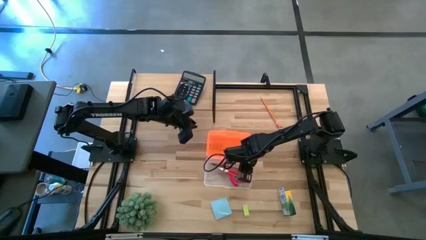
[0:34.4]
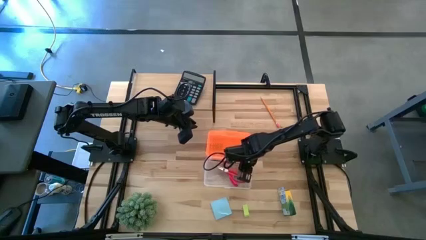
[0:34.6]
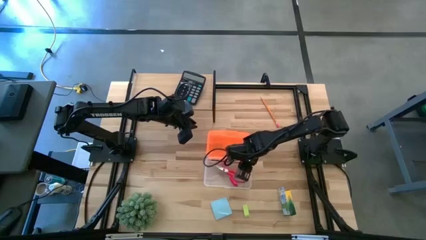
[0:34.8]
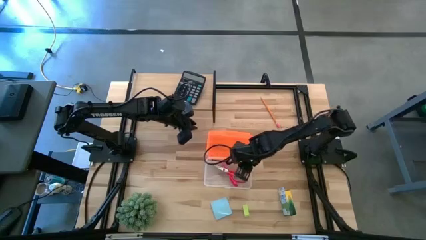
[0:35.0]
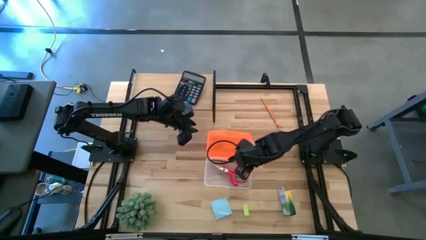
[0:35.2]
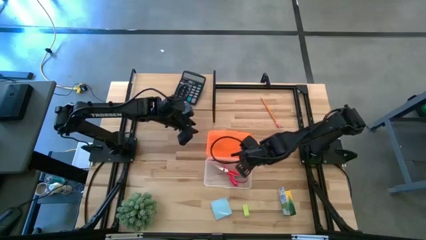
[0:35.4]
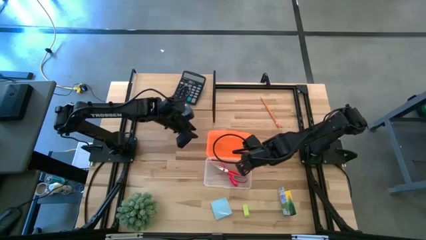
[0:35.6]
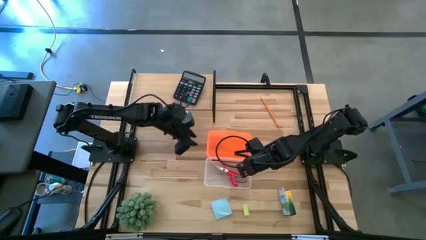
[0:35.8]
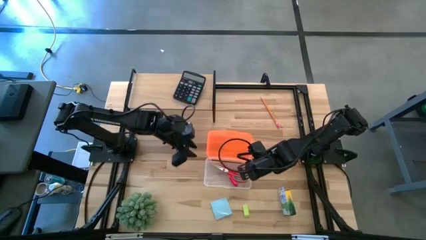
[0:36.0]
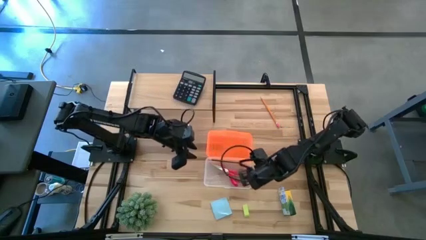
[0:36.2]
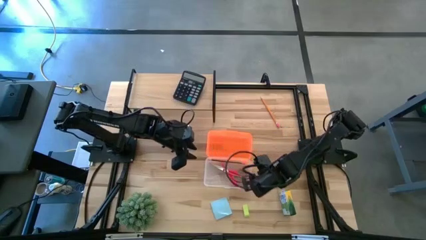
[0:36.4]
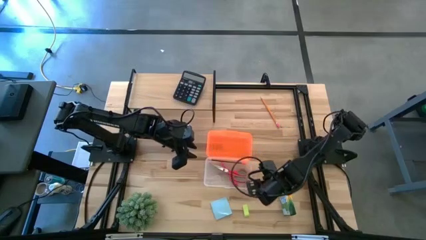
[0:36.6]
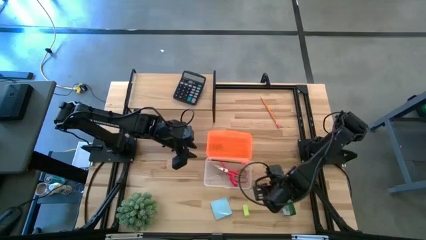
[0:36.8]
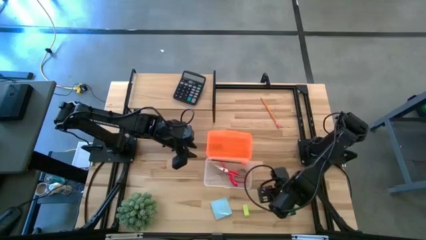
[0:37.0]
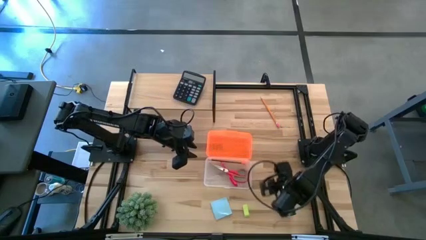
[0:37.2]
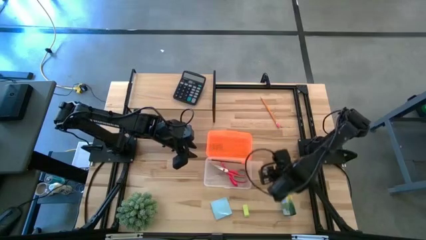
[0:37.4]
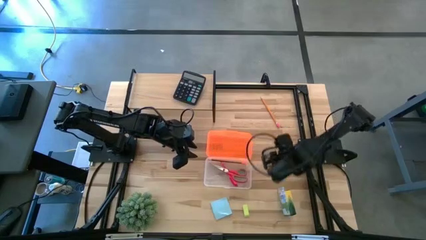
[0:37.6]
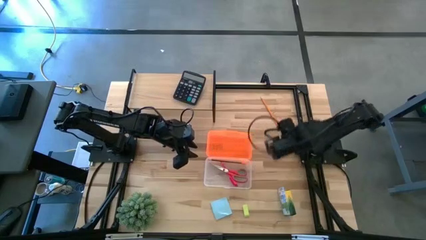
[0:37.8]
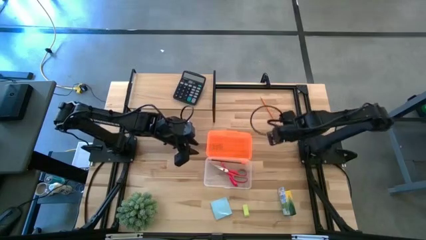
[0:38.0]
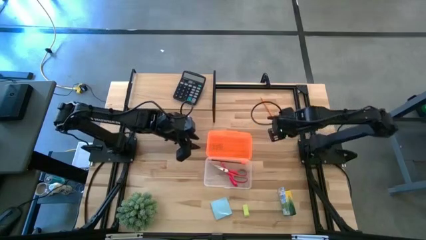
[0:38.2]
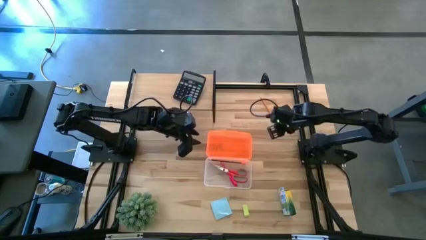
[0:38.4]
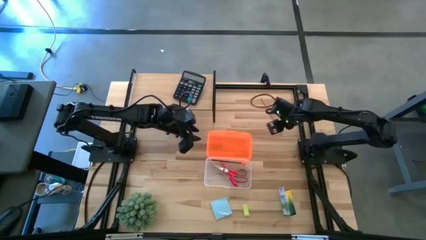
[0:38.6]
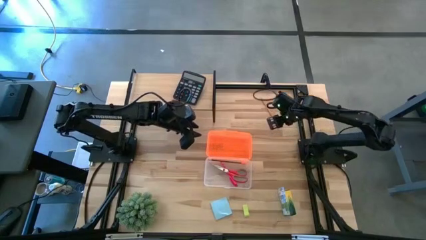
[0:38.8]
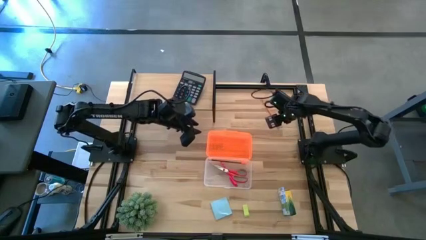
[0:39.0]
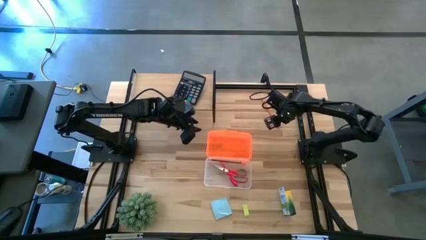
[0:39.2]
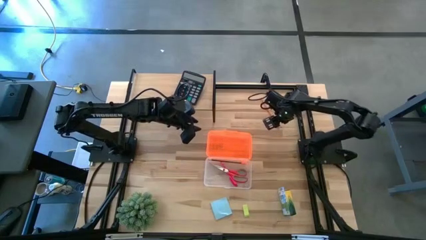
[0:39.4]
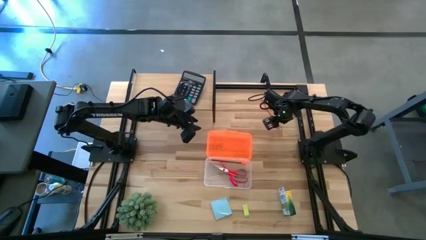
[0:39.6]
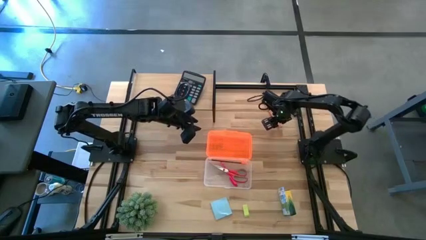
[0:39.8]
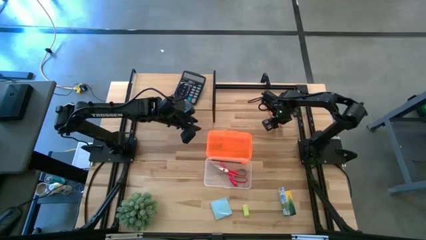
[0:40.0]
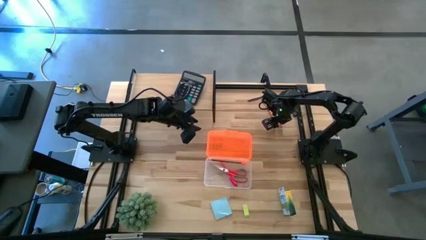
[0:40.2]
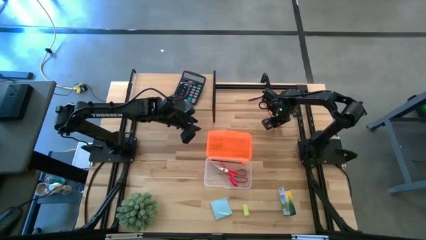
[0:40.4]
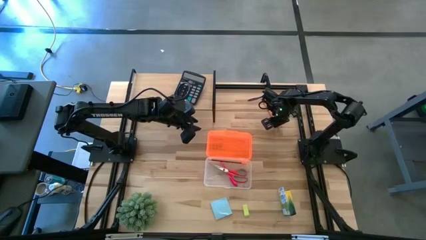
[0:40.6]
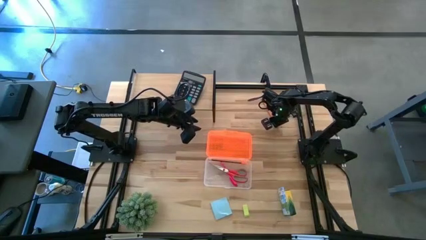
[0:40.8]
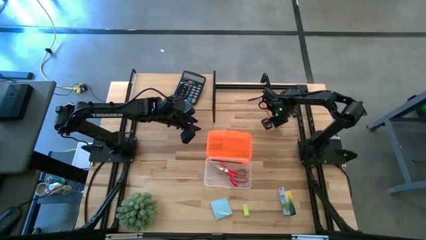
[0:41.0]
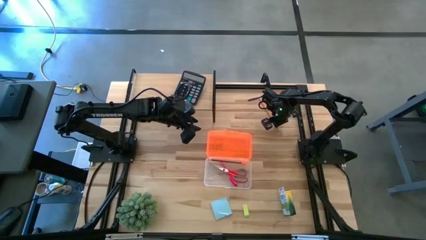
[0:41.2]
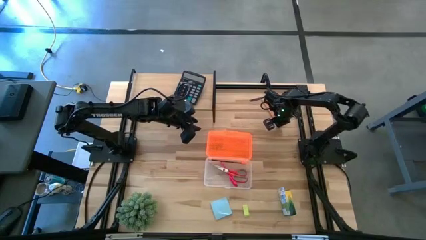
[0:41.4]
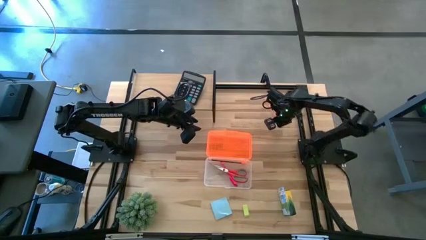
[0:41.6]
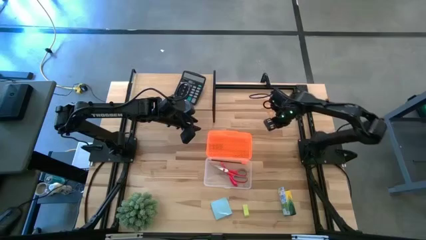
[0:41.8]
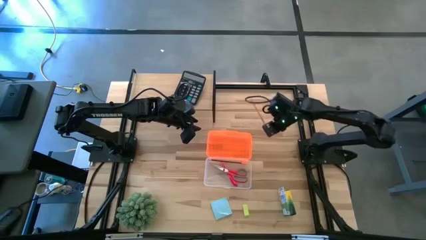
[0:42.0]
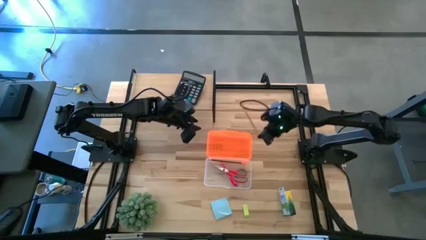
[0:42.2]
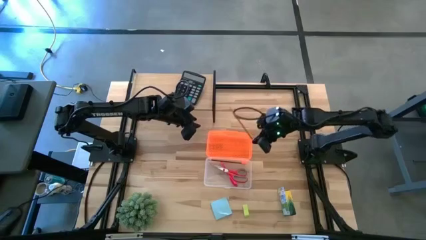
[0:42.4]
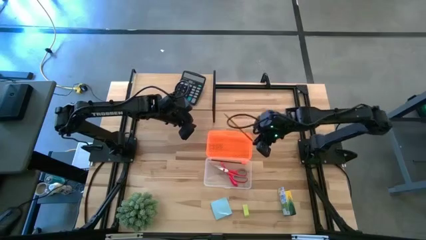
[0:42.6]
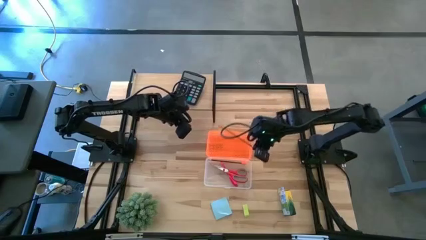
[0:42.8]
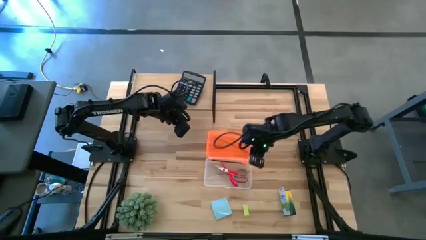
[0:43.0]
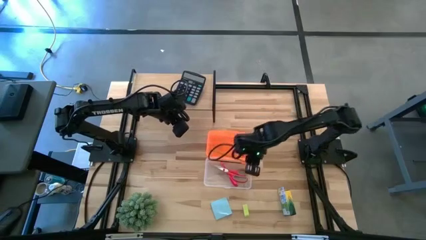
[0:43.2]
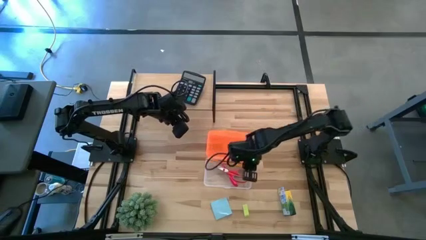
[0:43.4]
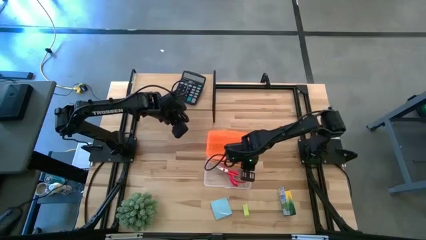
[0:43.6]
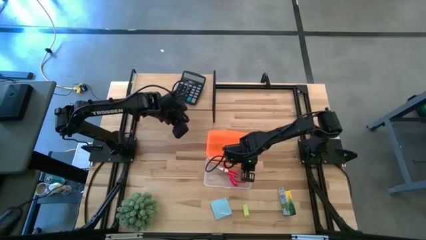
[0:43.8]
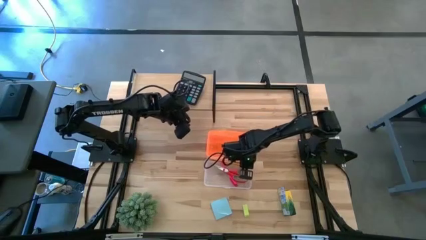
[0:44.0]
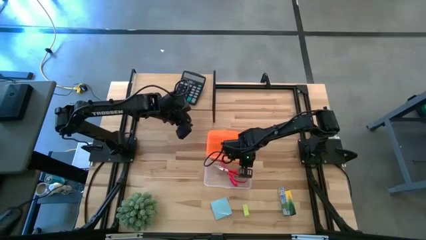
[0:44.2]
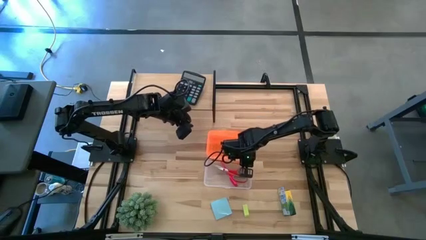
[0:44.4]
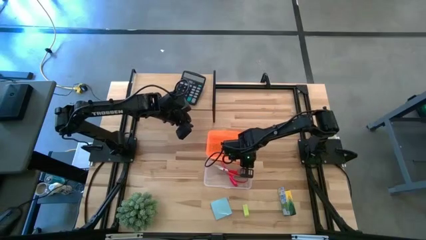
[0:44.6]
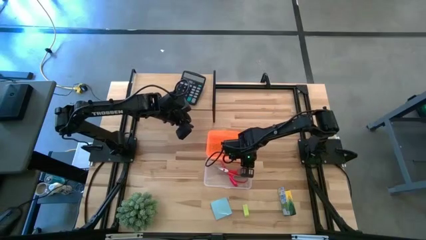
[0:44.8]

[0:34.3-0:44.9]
Task: Pack school essentials
Put the orange pencil into the supply box
